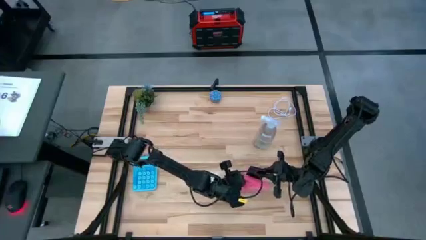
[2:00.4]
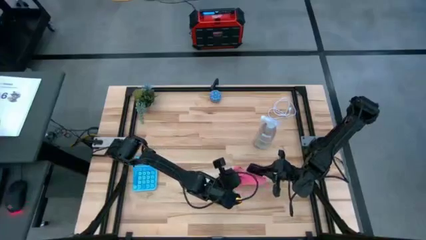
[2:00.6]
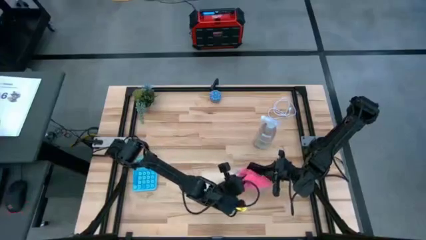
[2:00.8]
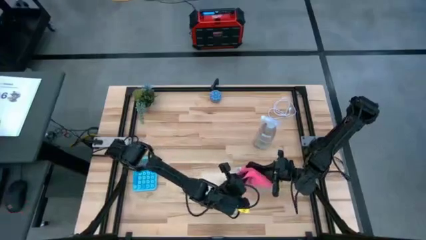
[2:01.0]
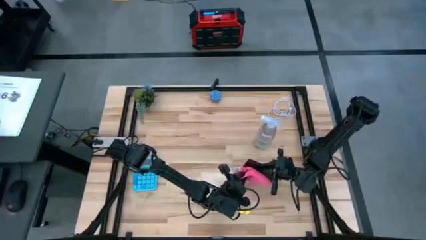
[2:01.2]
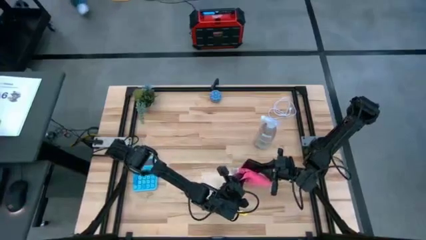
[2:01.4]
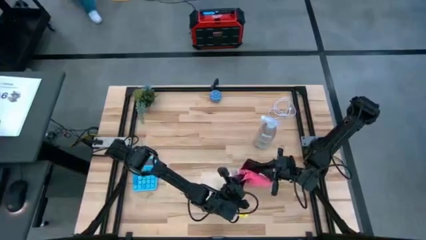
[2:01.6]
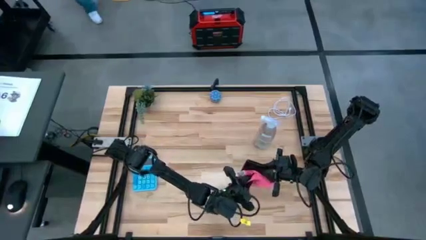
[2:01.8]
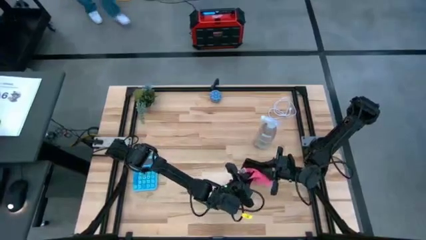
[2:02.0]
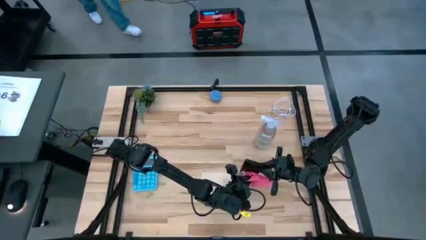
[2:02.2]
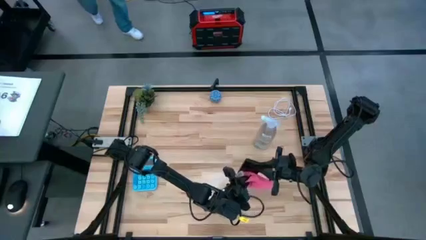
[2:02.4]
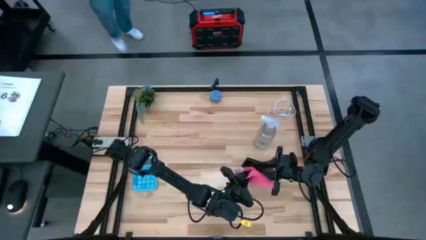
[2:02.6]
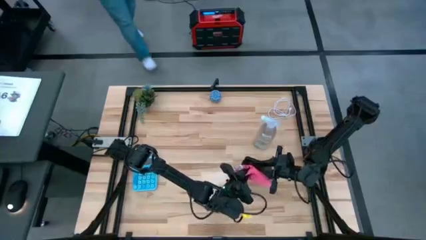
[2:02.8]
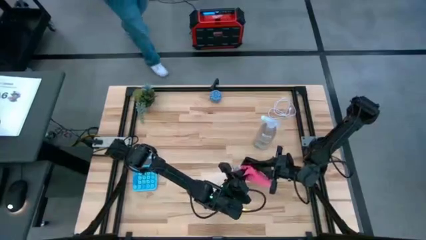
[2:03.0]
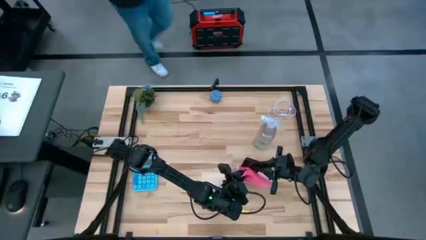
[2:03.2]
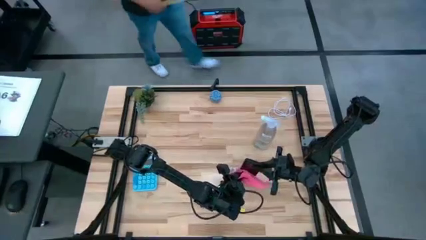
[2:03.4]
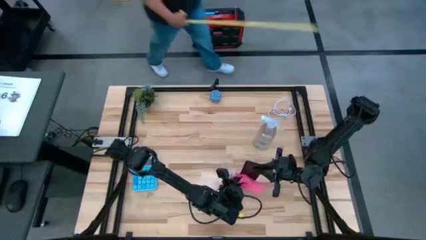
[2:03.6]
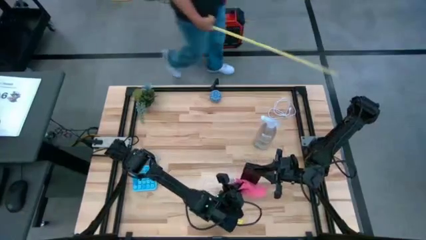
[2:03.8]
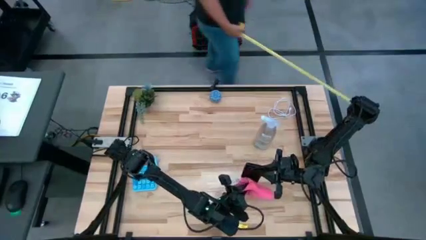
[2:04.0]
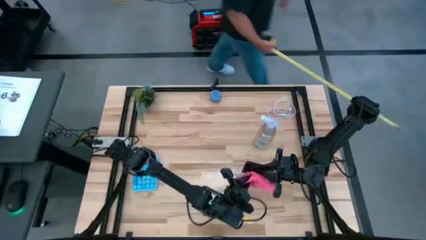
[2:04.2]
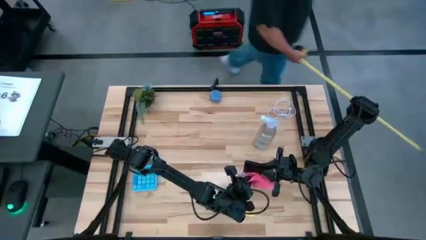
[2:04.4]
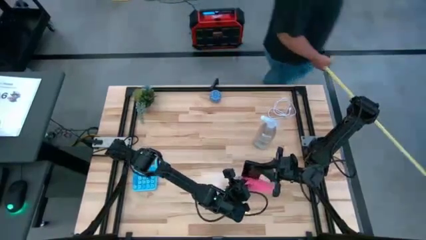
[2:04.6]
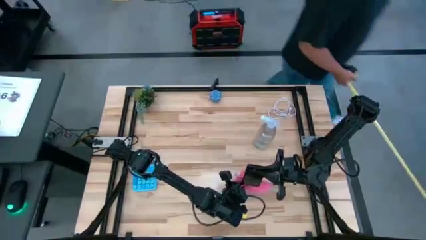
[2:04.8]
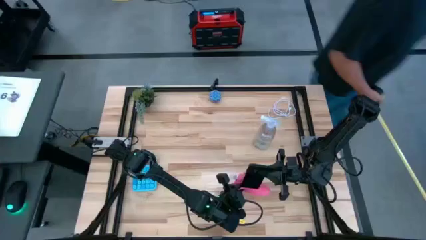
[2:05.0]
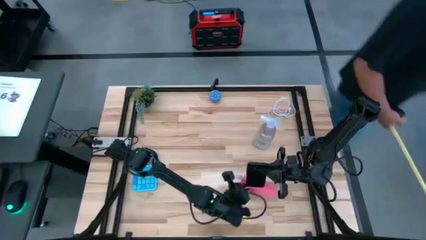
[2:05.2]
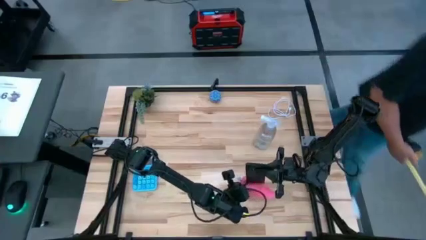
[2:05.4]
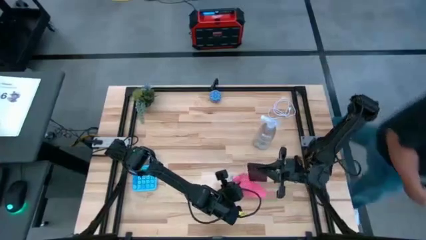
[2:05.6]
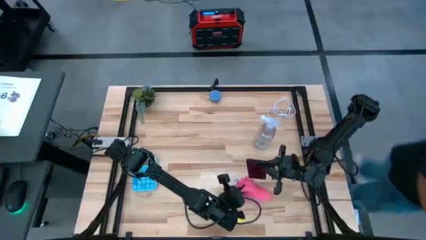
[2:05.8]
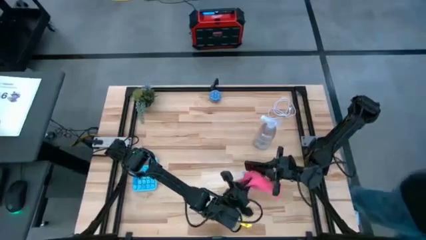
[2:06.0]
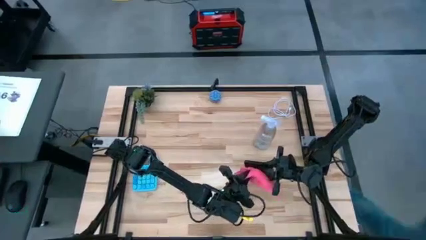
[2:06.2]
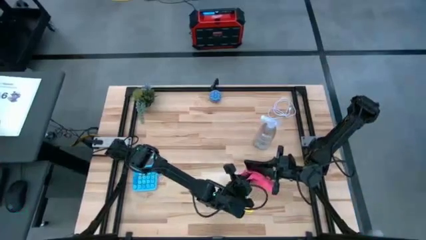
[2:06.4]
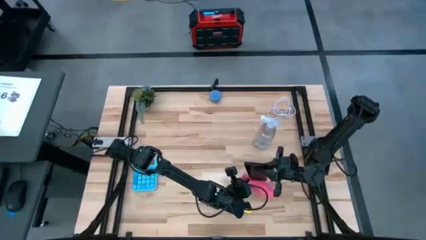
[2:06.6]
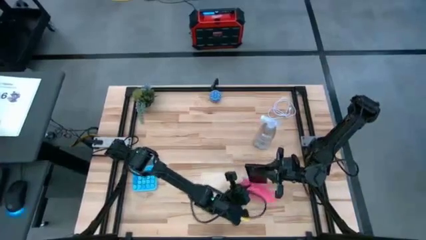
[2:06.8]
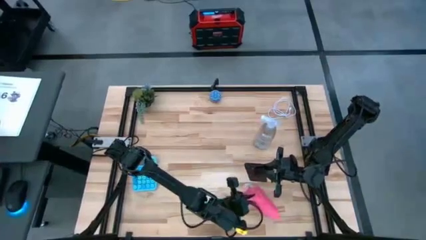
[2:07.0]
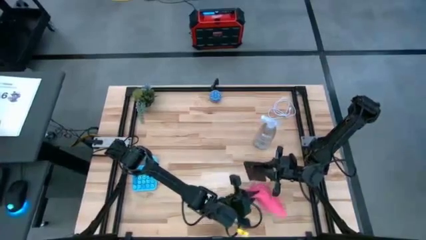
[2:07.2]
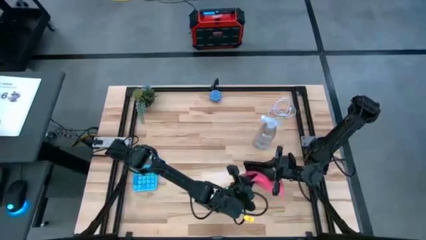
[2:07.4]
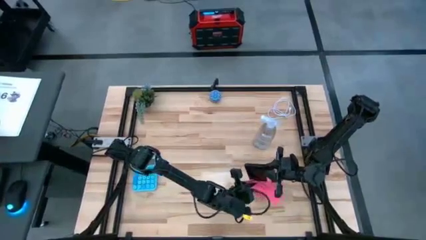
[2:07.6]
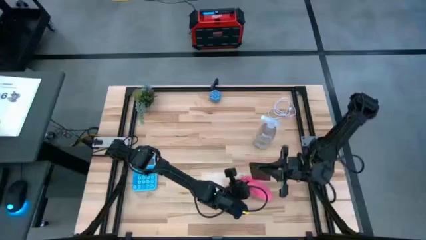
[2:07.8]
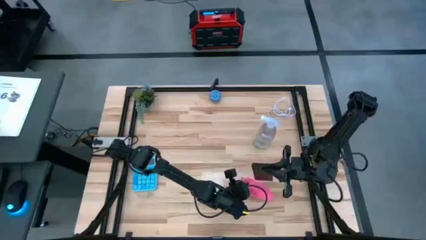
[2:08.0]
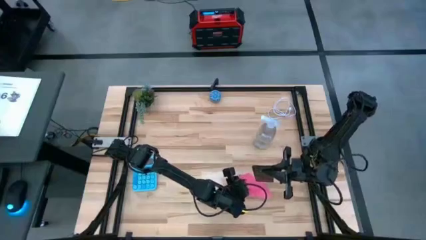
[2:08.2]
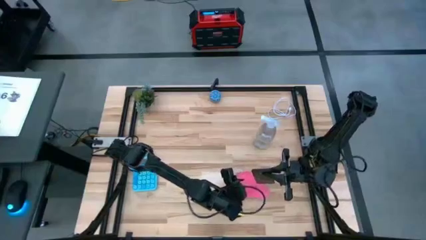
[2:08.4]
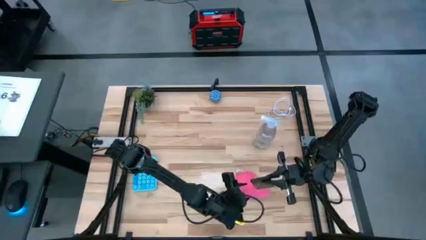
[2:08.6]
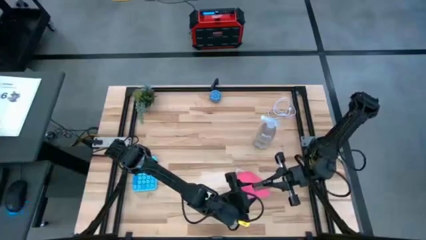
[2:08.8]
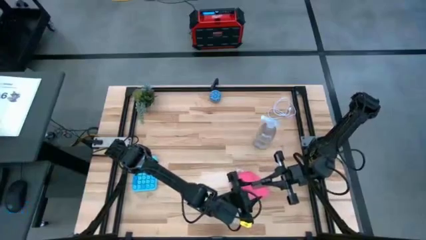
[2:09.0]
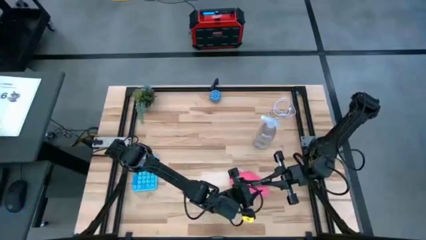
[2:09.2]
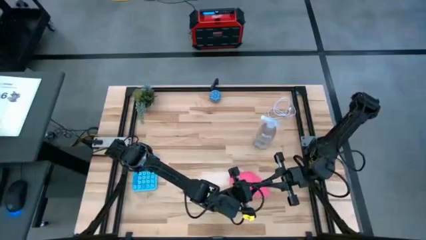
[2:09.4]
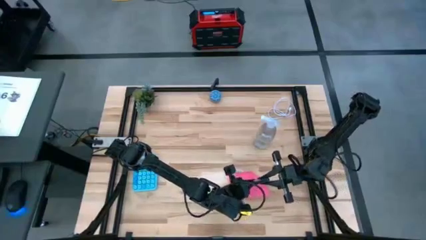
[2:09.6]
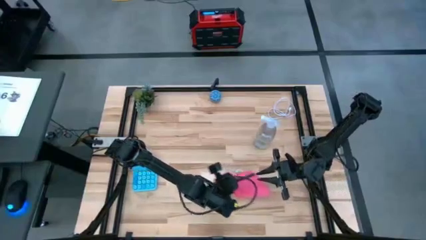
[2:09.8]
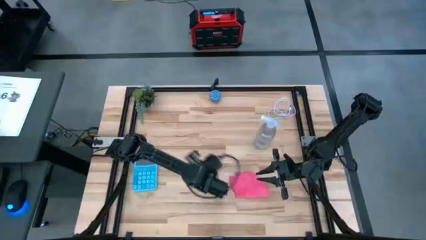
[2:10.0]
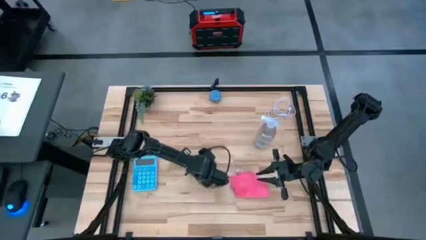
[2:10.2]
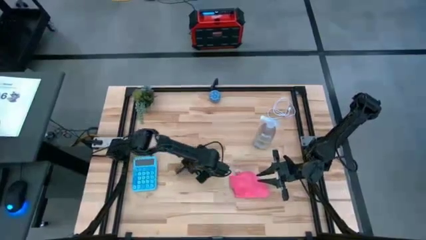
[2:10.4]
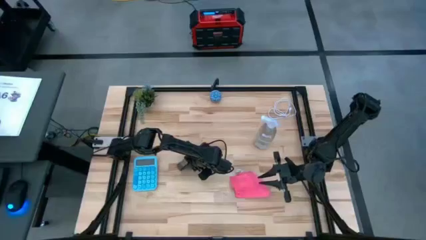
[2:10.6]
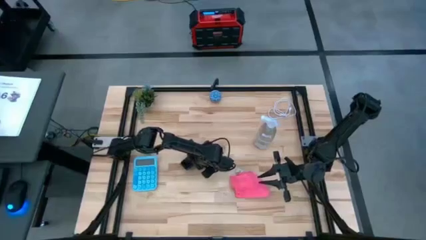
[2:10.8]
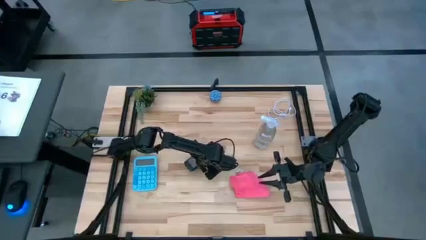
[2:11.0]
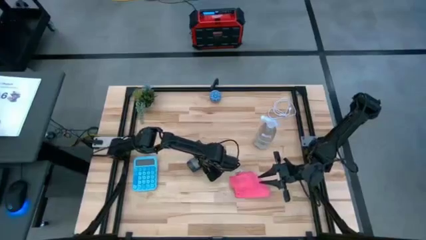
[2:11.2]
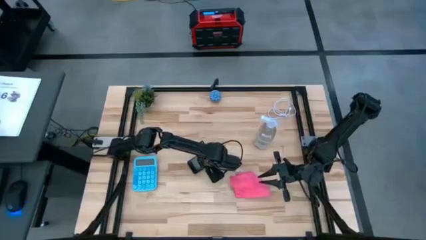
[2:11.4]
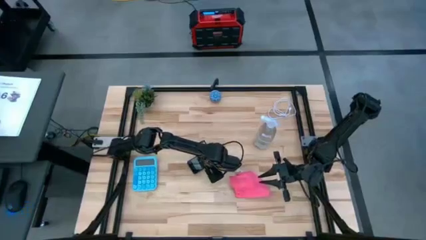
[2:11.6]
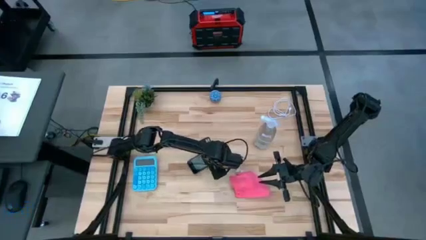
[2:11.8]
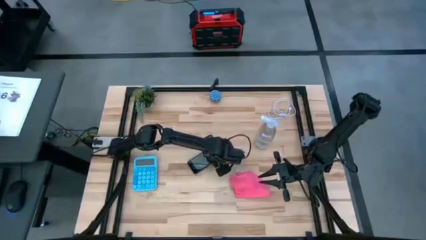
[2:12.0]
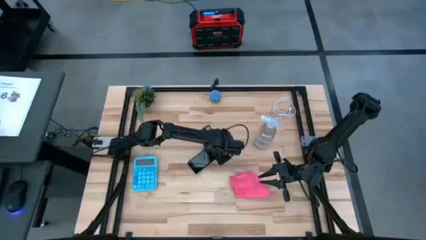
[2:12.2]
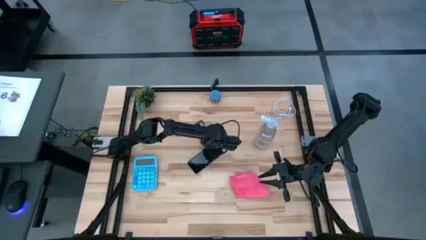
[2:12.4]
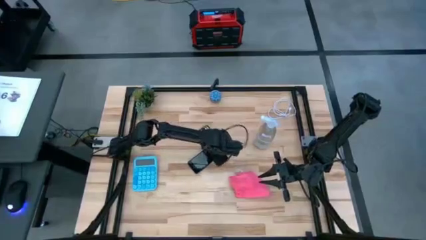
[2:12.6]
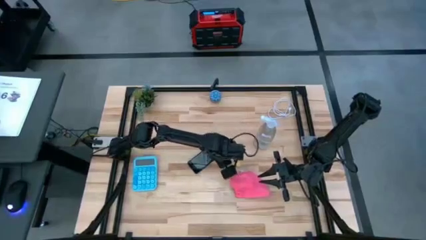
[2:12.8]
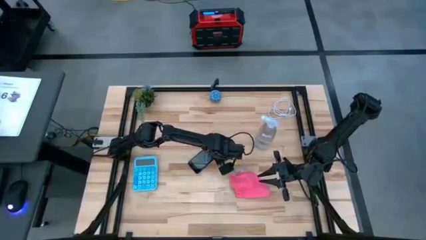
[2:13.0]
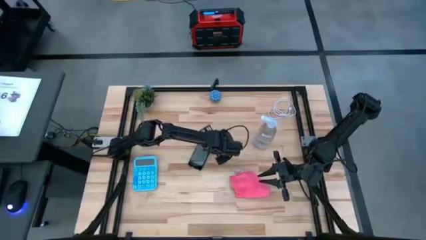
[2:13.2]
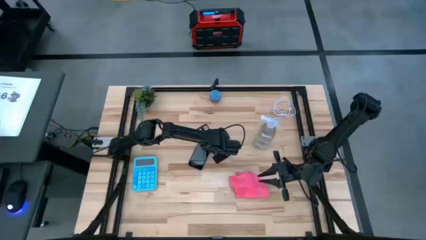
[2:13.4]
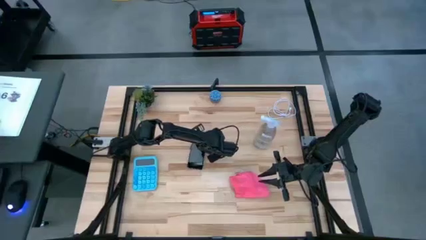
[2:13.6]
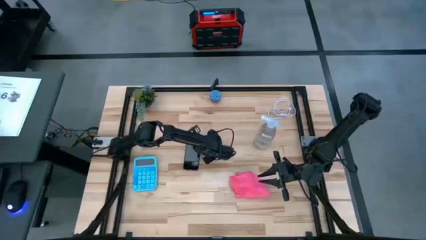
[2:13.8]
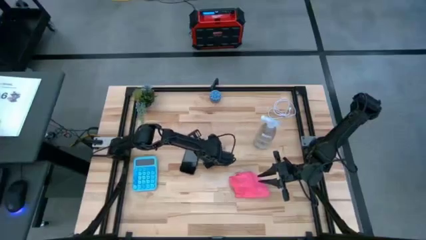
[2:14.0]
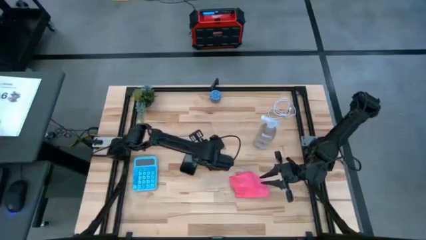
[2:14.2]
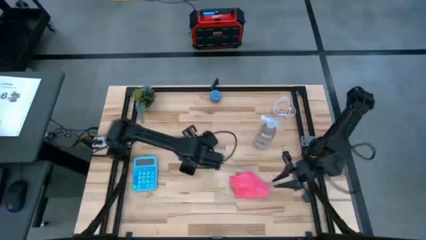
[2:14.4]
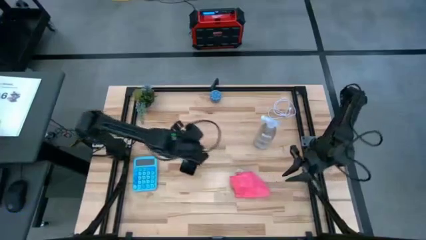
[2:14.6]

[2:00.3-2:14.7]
Task: Apply microfiber cloth
Wipe the black cellphone with the pink microfiber cloth
